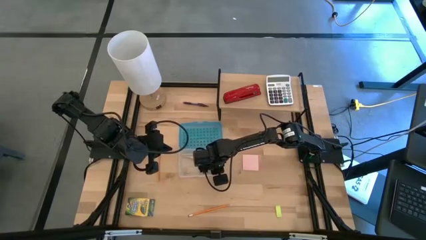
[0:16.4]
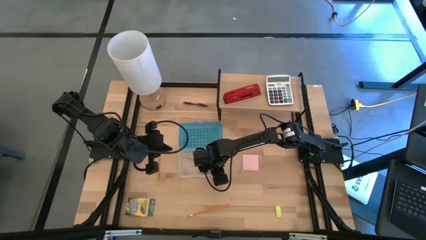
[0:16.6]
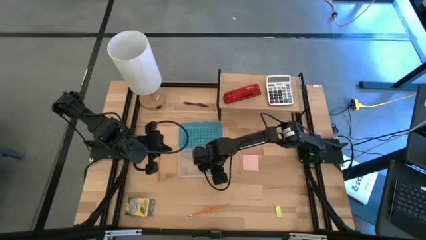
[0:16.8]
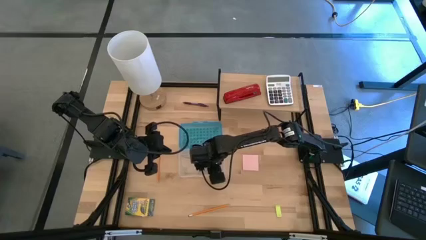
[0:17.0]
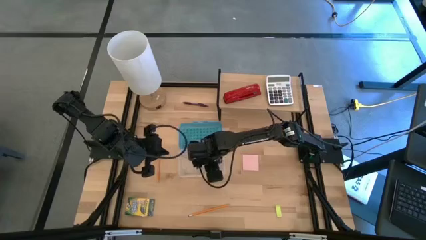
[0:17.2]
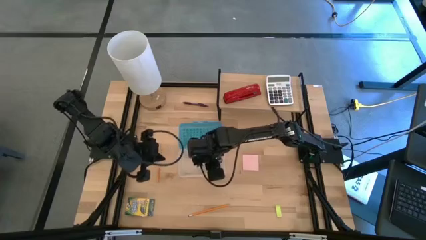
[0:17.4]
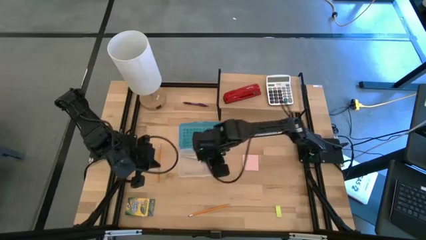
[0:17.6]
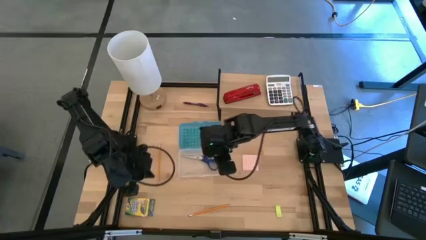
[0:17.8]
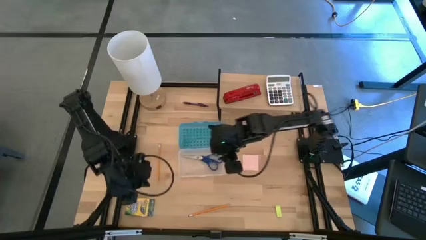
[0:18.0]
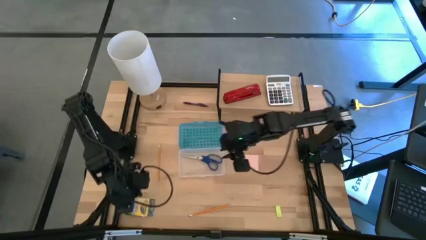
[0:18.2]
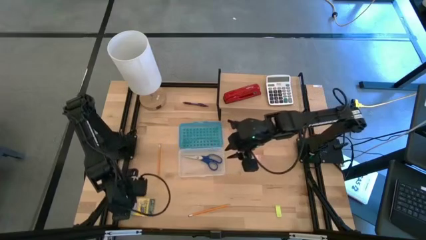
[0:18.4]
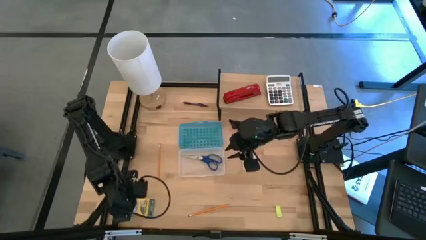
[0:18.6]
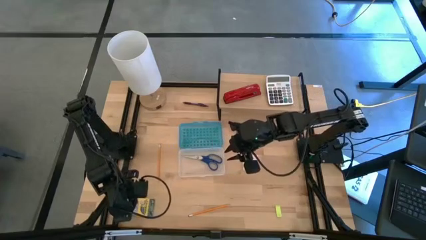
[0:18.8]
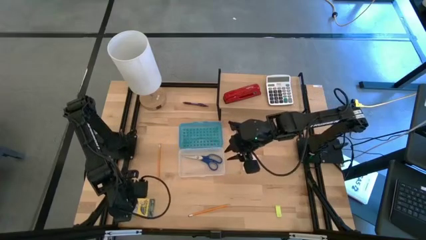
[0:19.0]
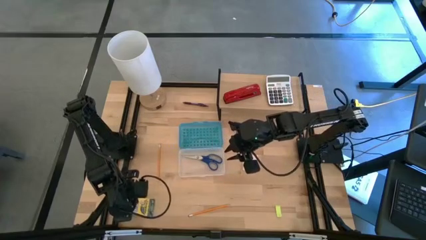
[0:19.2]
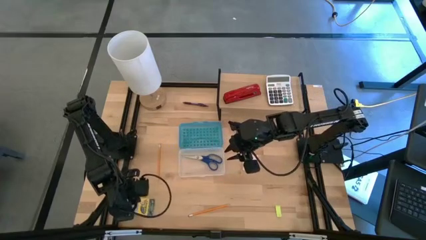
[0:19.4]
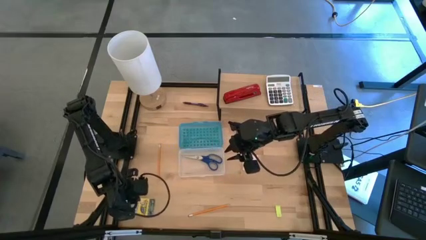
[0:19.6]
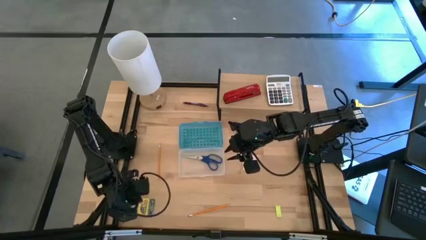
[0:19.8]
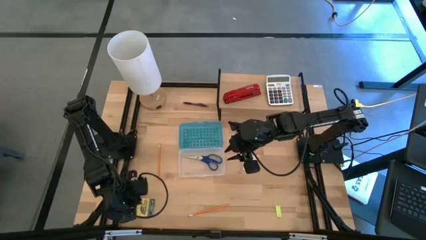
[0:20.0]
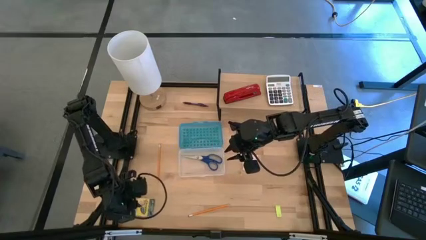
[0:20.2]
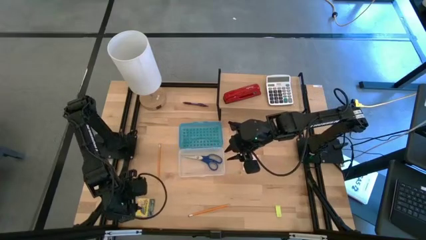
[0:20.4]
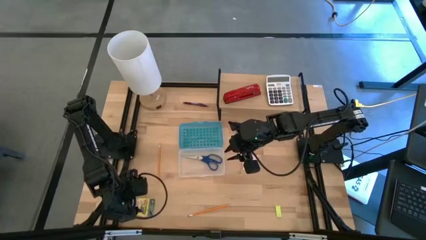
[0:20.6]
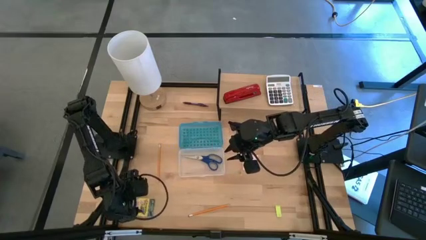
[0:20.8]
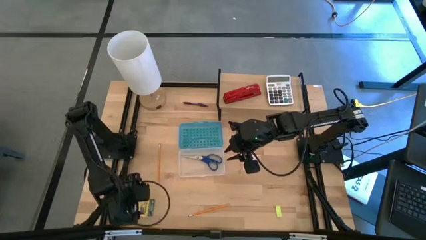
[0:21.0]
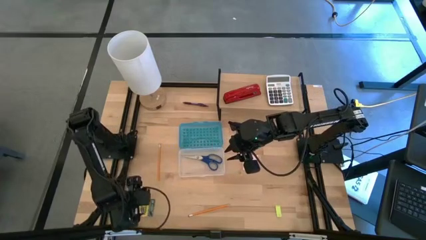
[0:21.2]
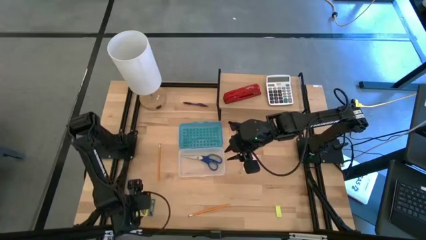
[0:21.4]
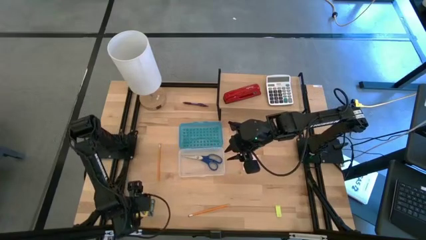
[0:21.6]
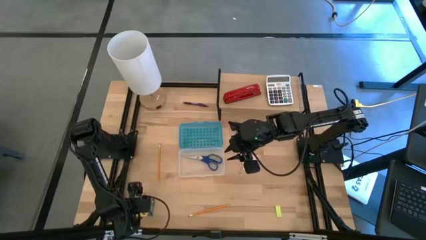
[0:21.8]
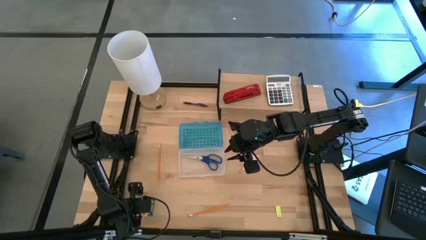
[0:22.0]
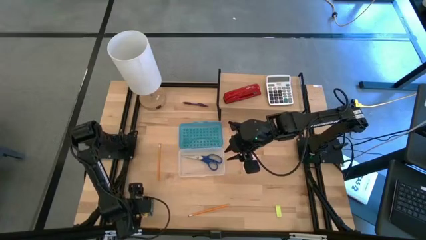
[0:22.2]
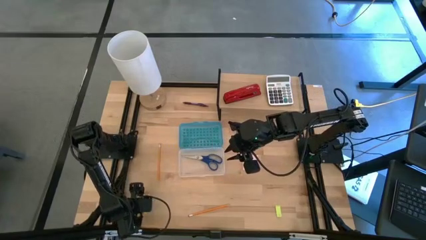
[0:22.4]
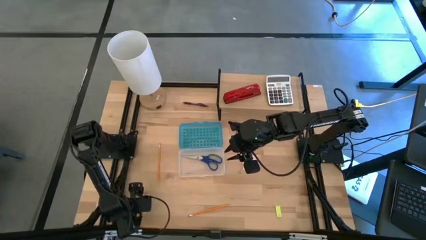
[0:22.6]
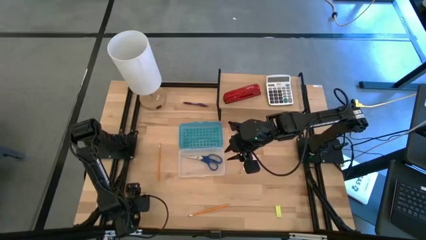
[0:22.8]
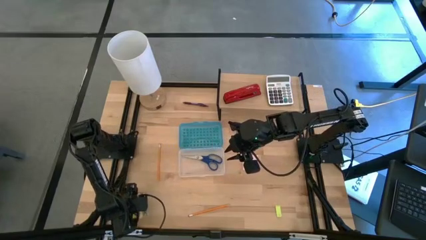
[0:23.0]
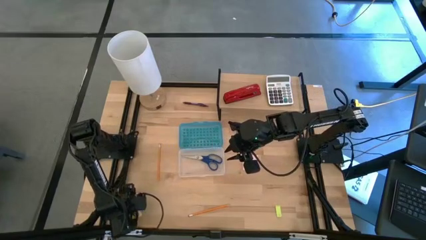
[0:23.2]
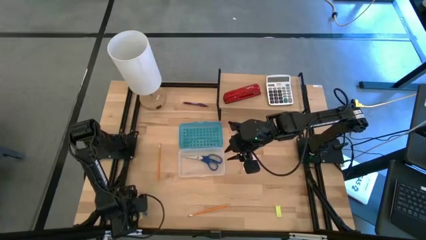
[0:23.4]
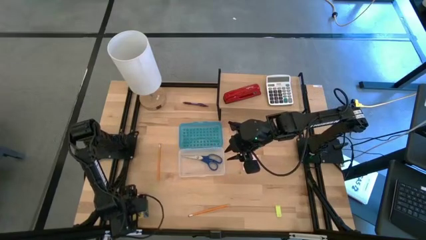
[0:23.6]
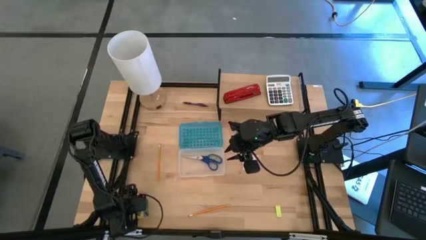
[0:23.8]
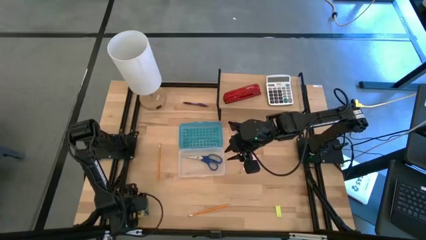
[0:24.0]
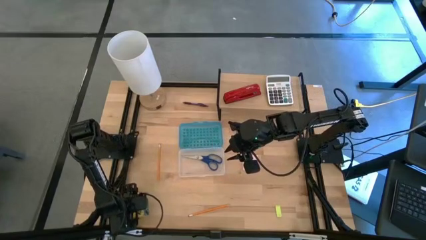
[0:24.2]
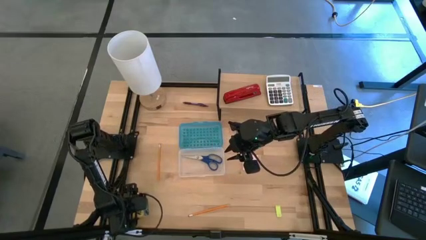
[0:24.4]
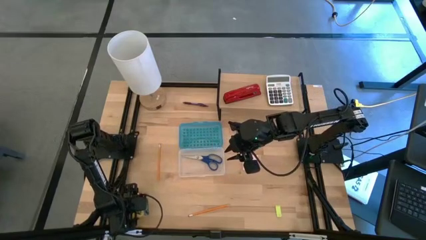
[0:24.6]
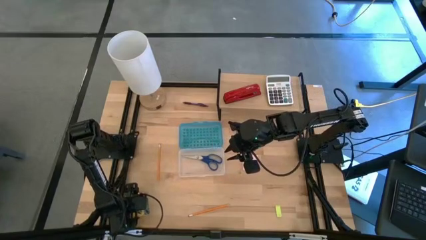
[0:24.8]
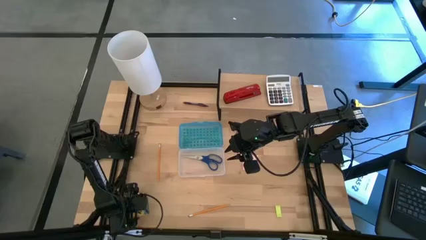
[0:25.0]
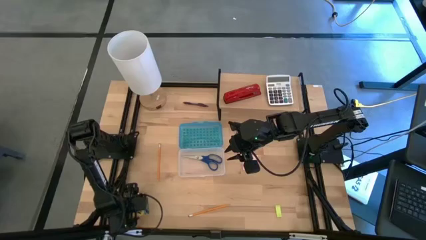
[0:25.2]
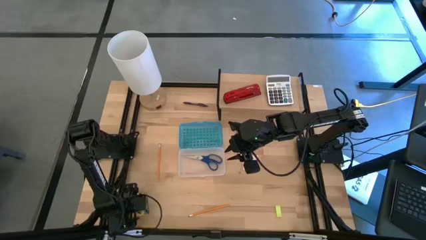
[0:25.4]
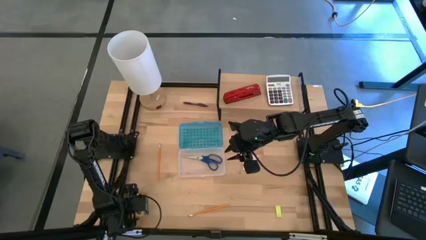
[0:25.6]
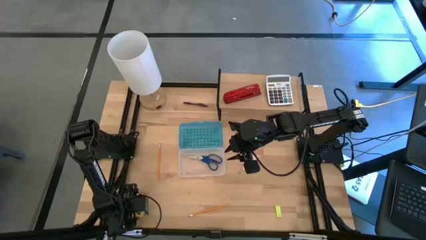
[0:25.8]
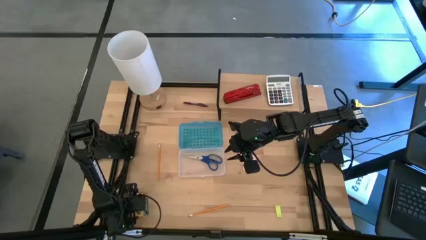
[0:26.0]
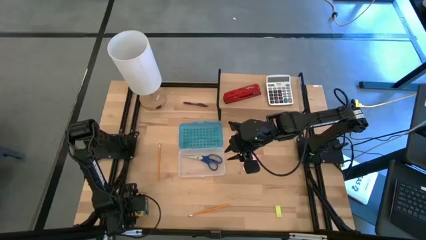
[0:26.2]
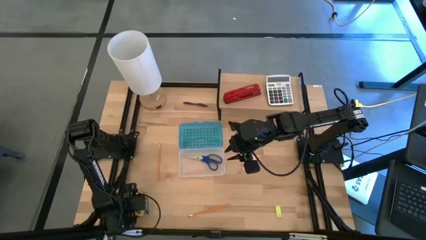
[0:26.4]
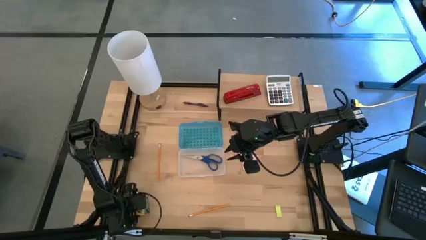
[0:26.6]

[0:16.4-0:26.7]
Task: Pack school essentials
Put the yellow crayons box into the blue supply box
